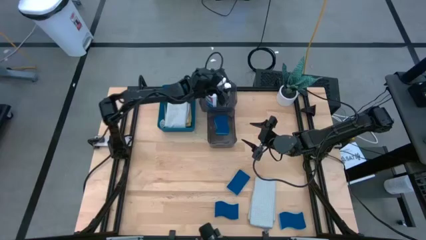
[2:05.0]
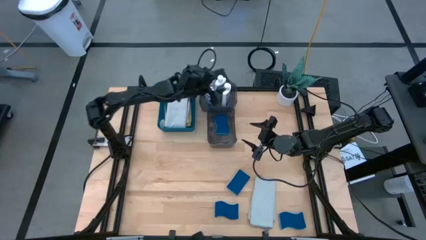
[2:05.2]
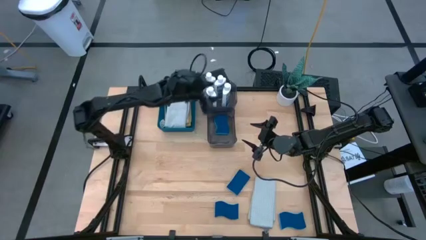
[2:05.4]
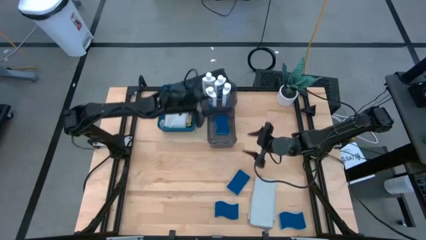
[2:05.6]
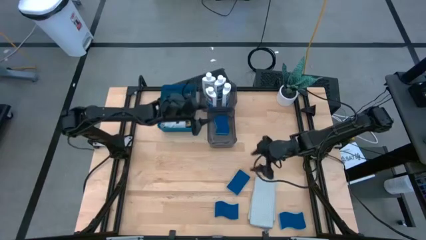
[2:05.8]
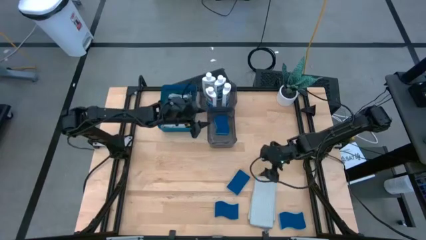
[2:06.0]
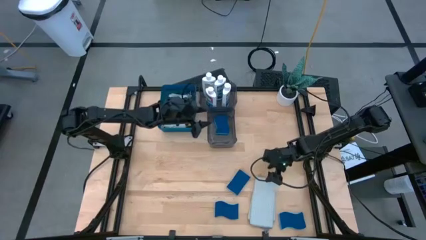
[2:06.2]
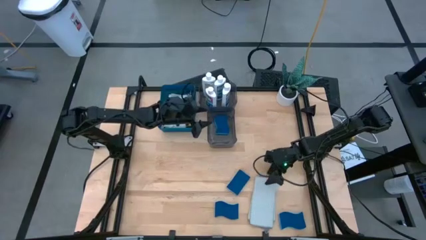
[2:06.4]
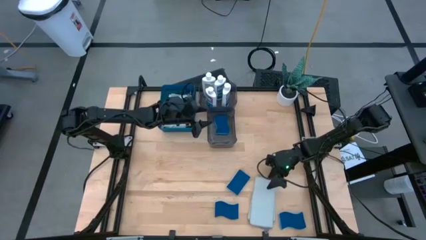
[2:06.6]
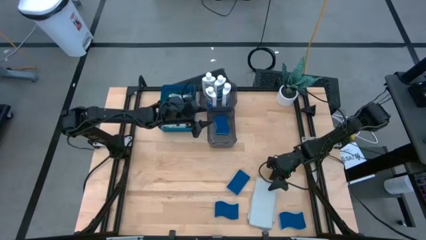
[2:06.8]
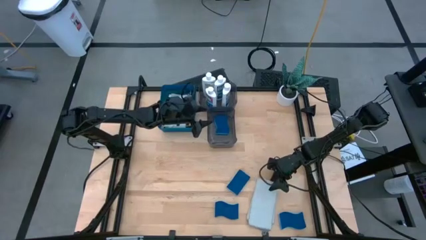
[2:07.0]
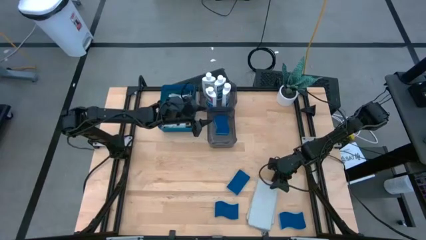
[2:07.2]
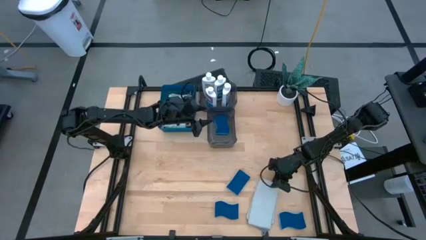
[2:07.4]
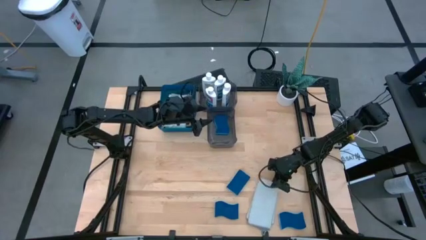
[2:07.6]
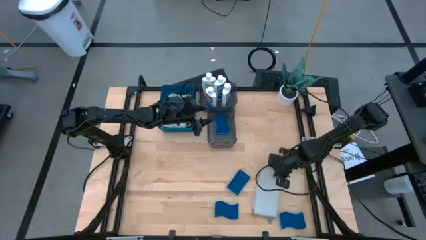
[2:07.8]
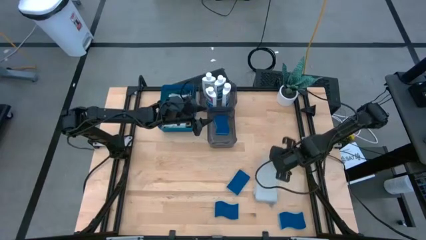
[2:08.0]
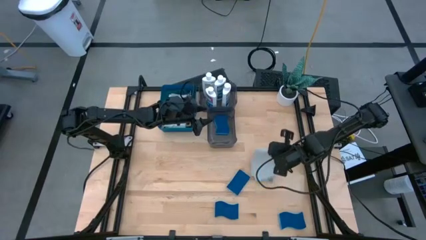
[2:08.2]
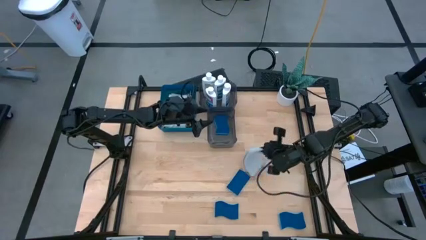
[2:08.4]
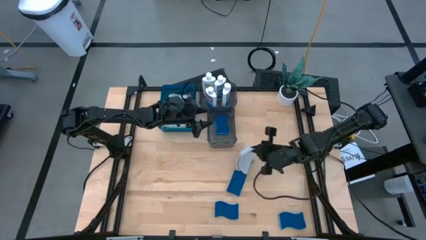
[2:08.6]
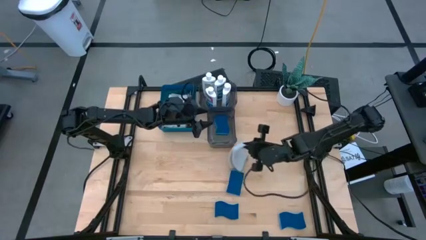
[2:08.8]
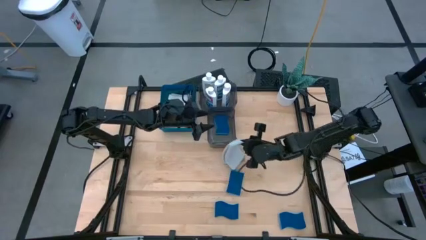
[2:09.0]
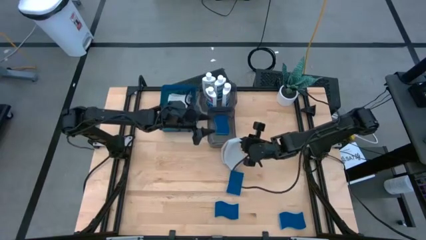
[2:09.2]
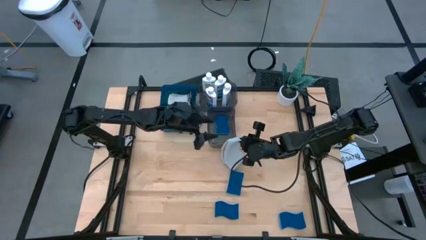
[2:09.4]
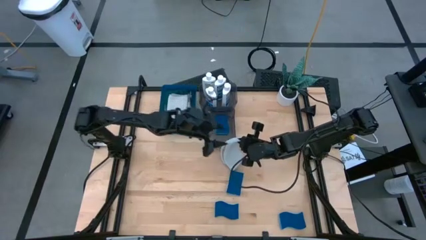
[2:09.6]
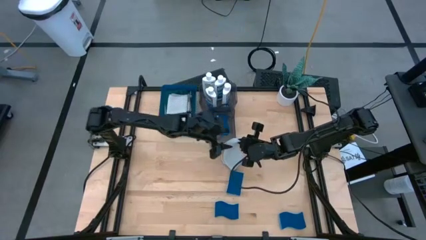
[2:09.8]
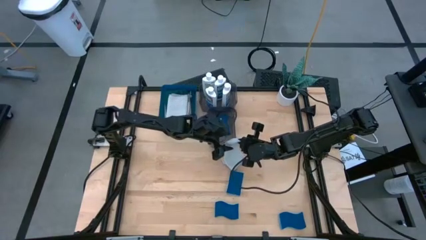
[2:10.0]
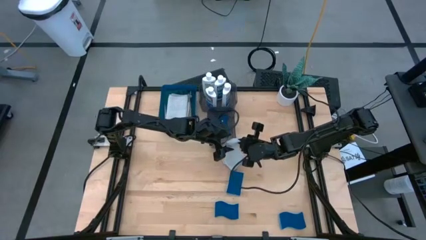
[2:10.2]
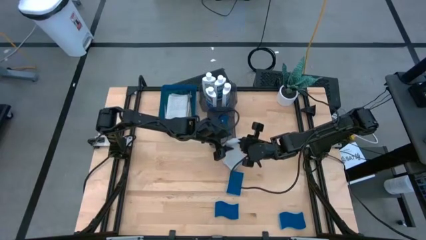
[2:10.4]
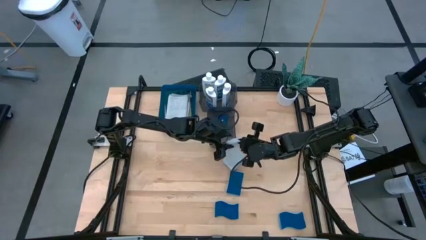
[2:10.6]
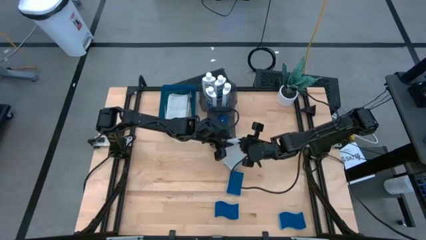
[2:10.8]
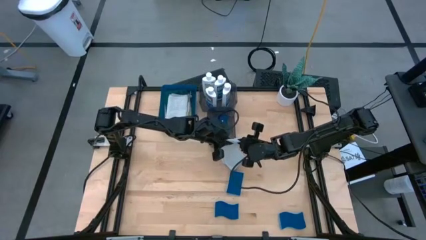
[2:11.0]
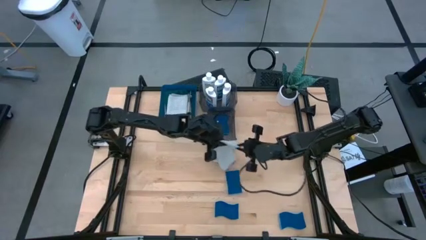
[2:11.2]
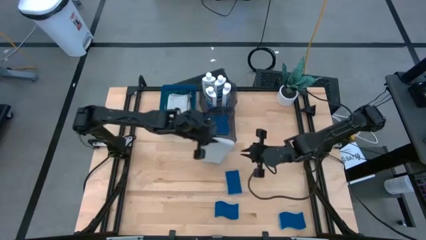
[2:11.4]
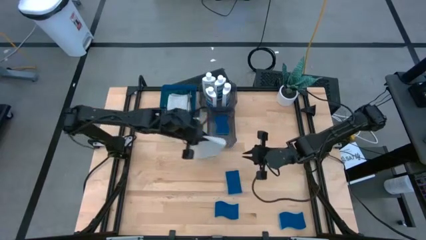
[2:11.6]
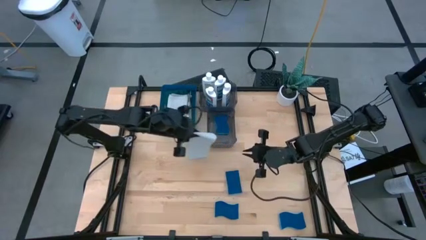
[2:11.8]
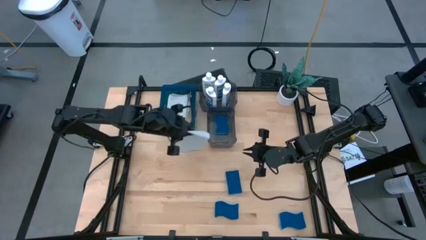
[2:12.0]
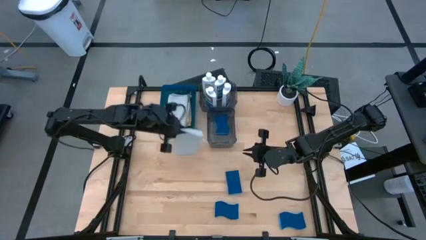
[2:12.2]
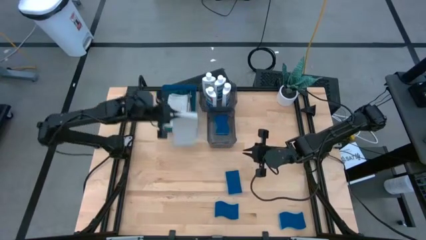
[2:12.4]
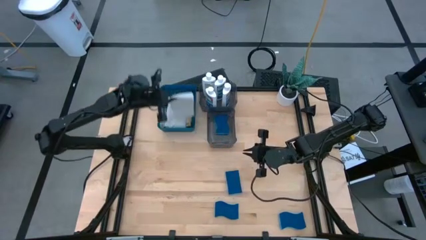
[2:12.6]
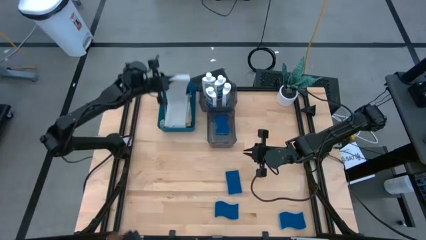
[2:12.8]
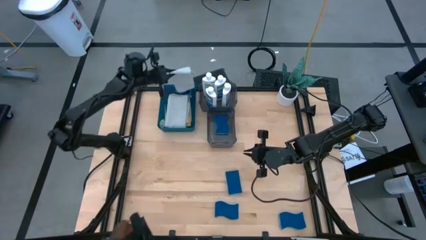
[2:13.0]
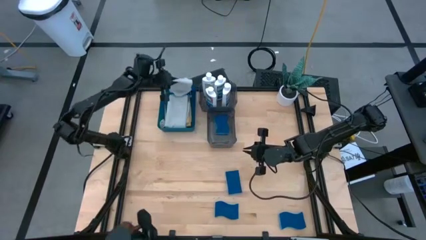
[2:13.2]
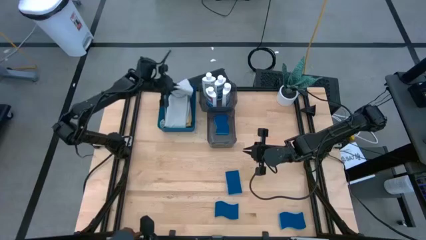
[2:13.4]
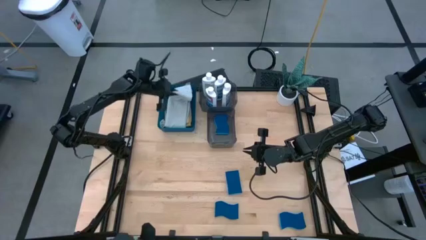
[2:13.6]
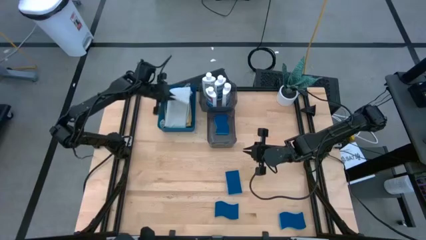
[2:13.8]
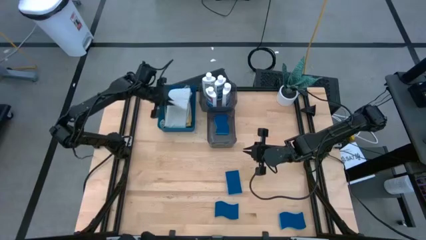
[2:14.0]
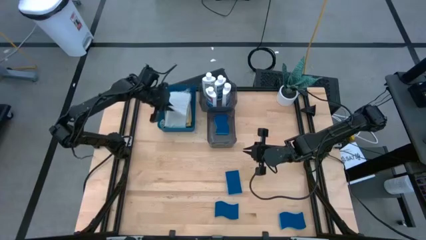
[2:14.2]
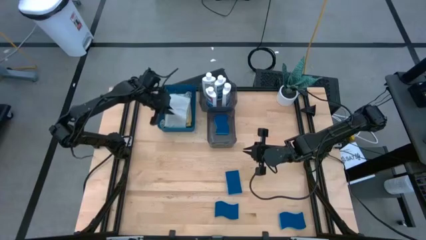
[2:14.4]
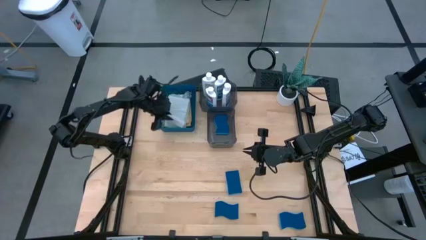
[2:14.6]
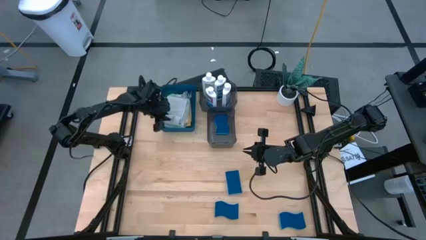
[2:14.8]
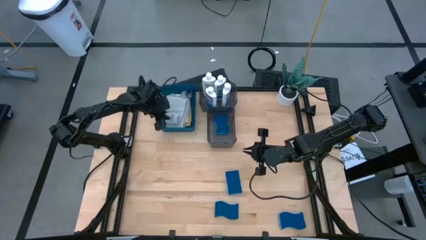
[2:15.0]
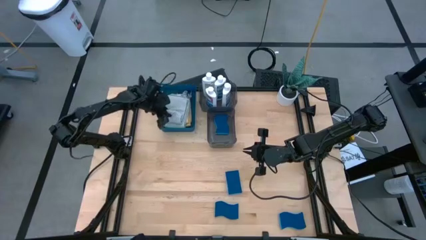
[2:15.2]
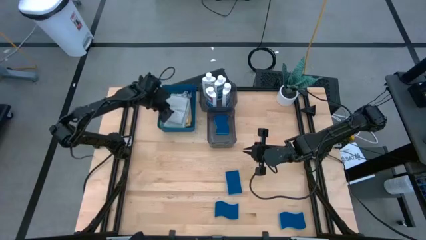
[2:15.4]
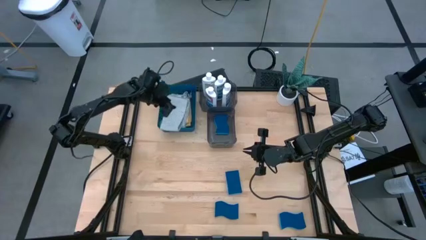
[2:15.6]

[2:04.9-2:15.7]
Task: Pick & Place Kitchen Items
Put the gray microfiber towel into the blue bin

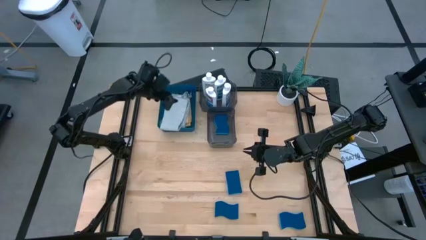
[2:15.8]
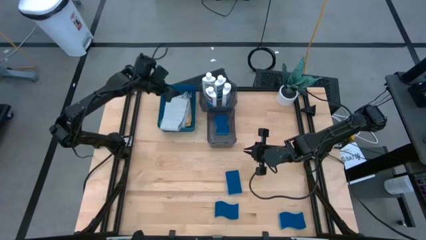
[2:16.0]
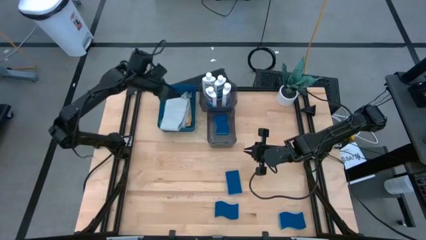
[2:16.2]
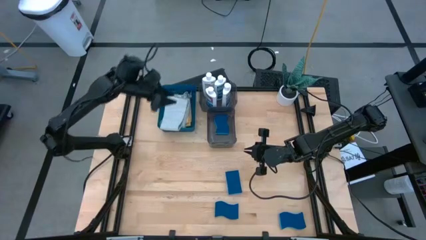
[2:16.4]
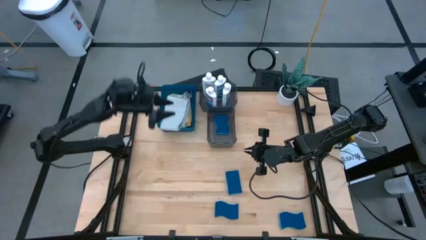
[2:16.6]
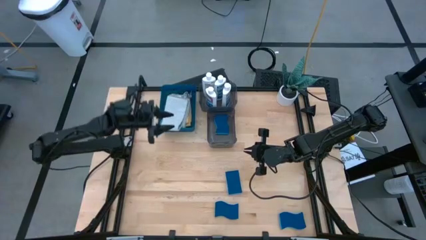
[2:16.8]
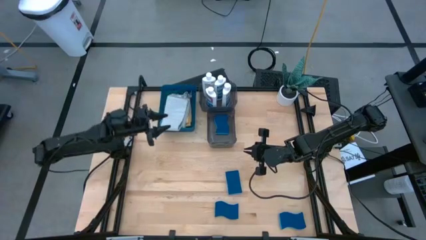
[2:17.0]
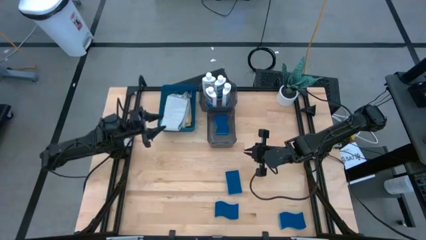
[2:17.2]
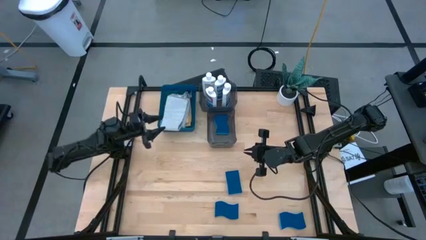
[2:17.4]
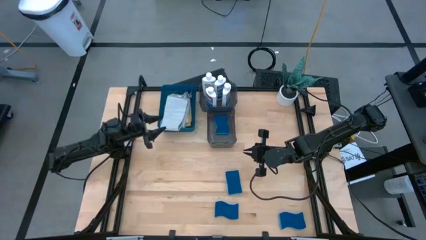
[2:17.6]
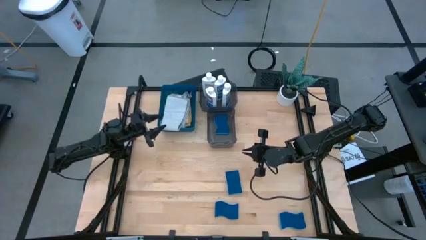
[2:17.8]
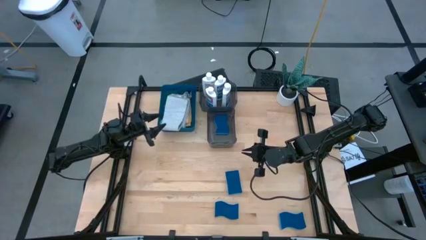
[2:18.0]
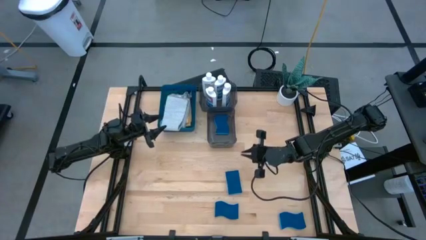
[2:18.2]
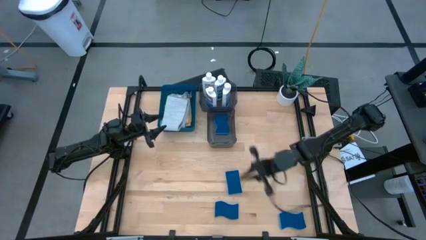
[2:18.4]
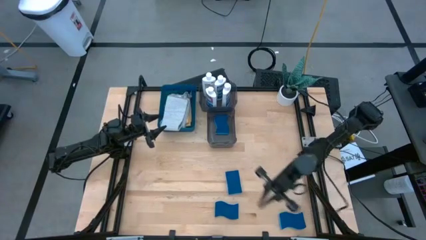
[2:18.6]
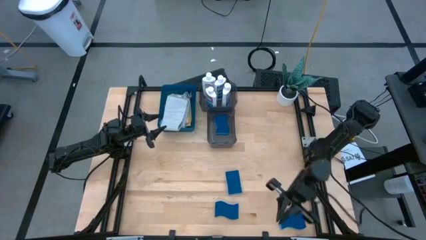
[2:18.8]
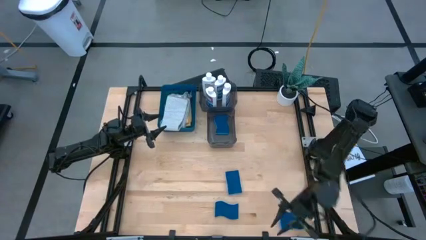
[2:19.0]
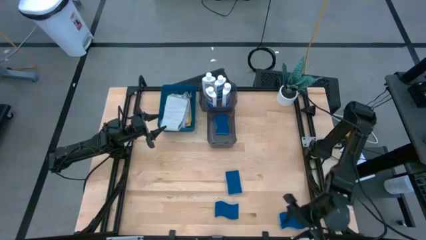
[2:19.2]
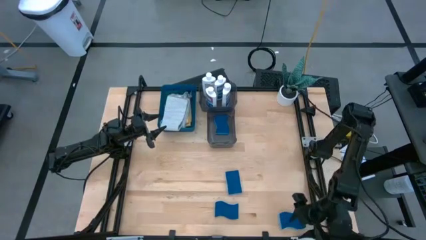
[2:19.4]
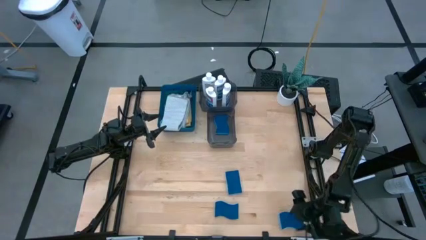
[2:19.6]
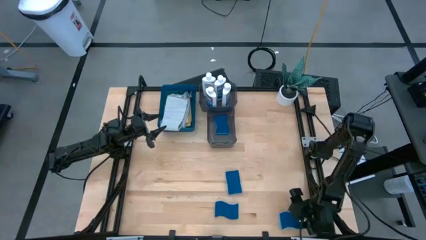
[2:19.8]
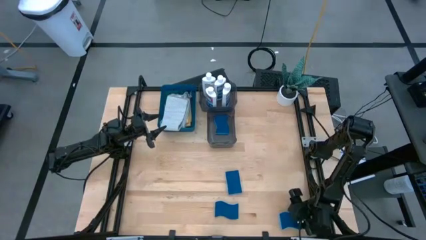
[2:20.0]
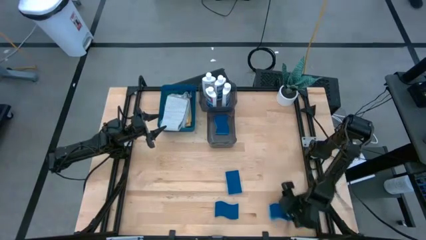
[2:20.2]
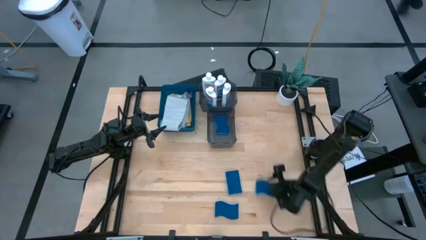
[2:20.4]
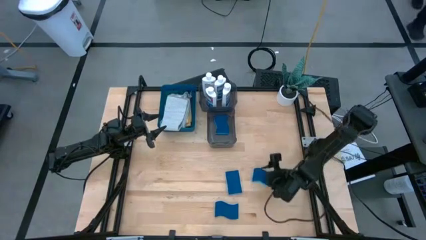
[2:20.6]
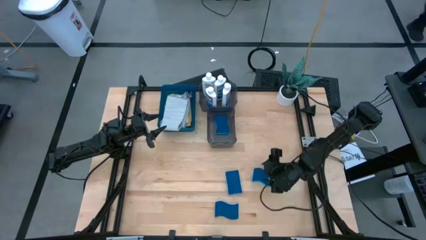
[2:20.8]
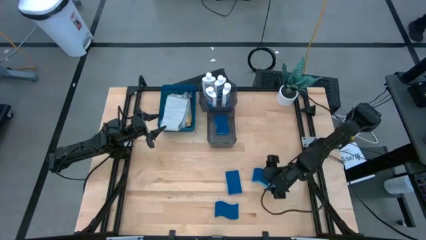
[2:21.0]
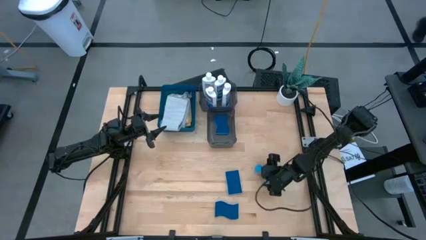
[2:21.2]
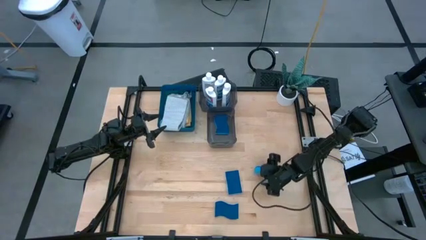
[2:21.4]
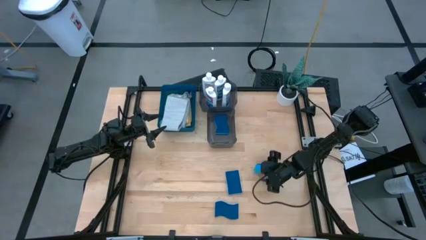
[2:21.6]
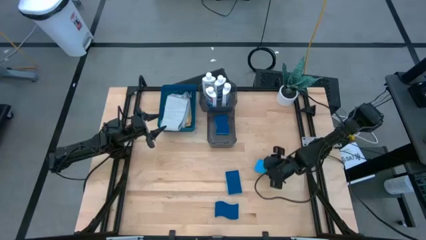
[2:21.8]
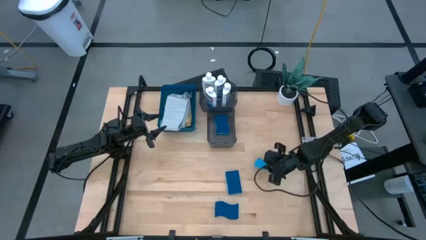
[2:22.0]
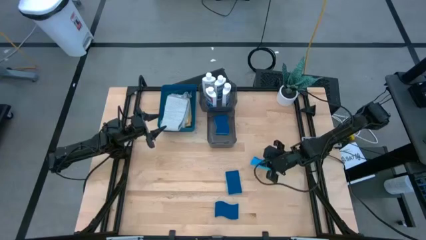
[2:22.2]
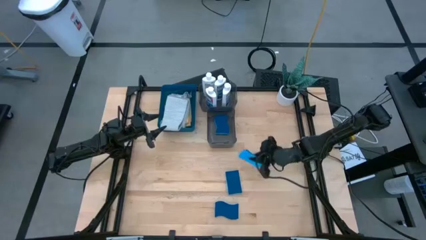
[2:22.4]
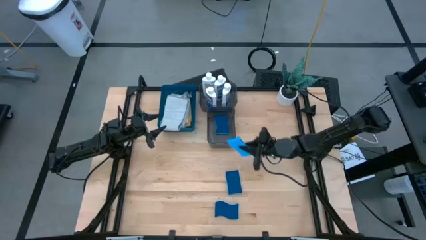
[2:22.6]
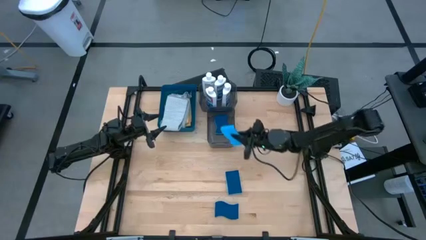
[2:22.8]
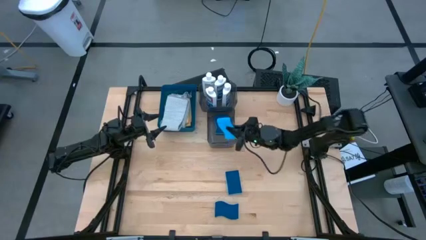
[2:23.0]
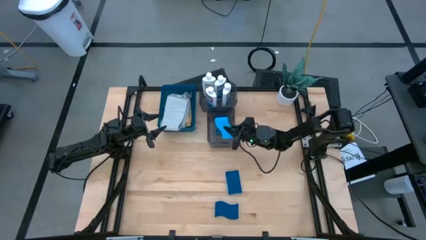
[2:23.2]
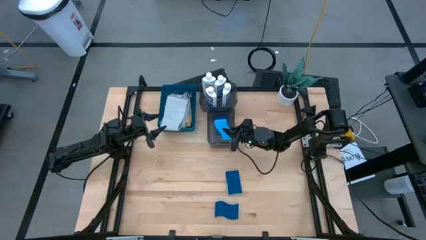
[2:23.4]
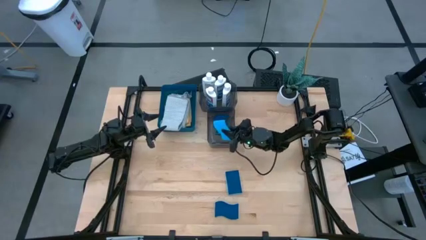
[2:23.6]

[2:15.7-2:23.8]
Put the blue sponge into the bottom black bin
